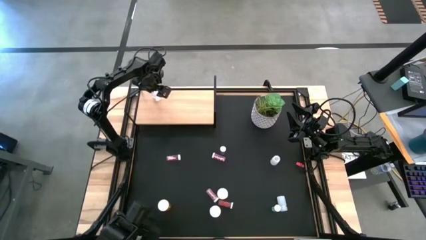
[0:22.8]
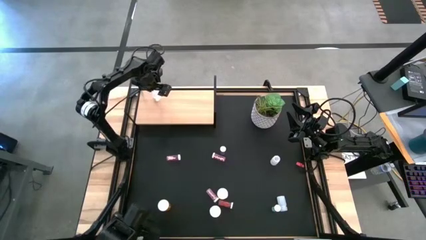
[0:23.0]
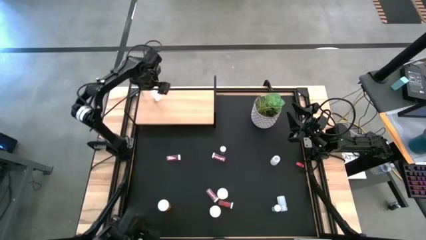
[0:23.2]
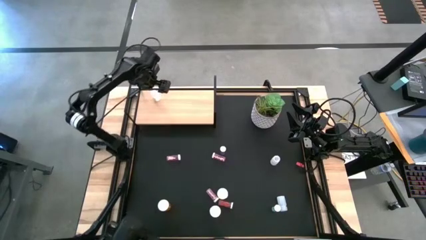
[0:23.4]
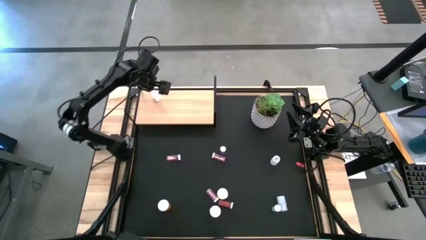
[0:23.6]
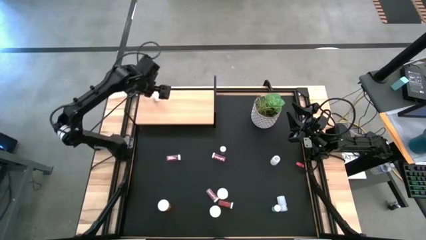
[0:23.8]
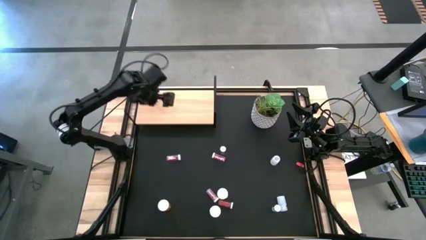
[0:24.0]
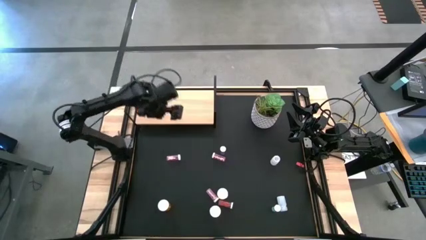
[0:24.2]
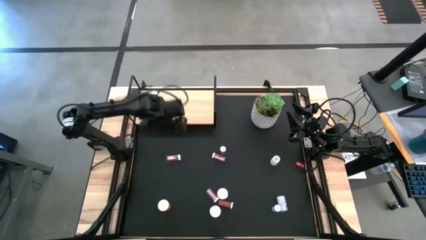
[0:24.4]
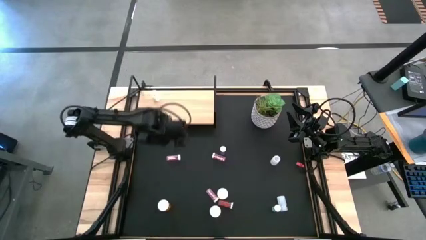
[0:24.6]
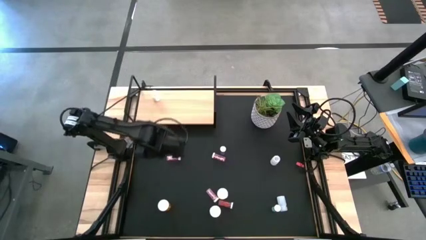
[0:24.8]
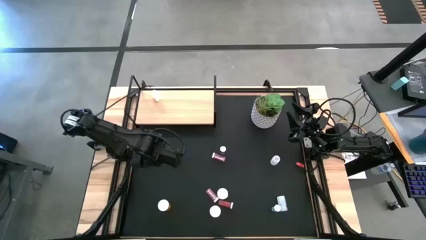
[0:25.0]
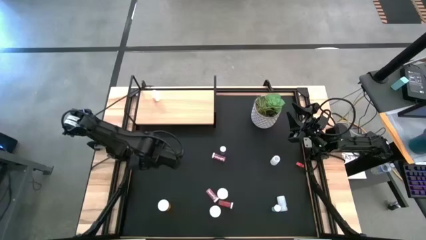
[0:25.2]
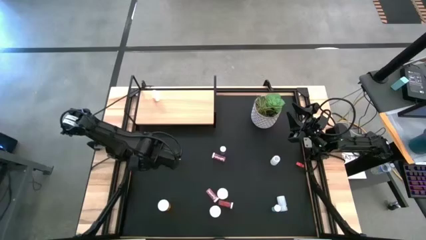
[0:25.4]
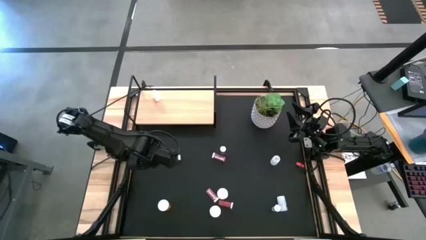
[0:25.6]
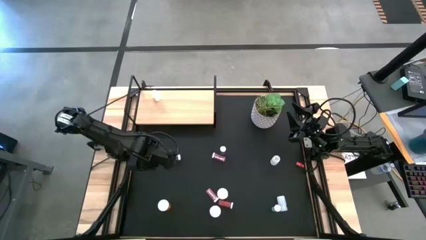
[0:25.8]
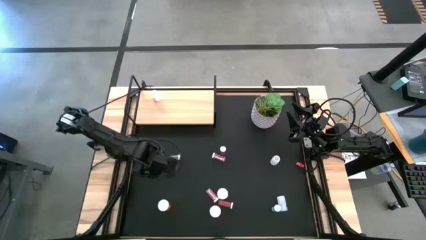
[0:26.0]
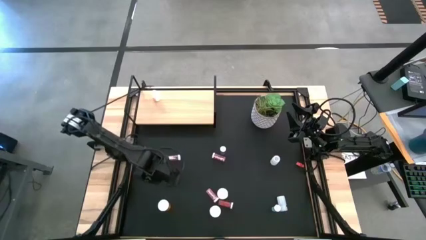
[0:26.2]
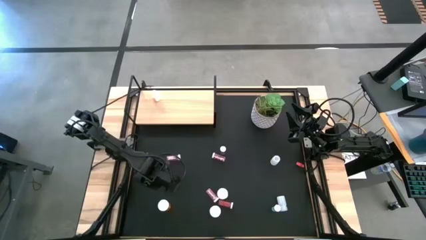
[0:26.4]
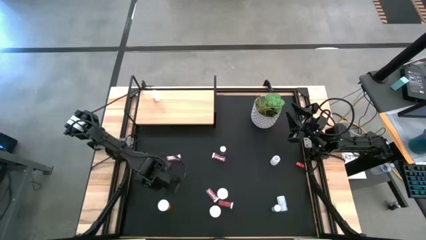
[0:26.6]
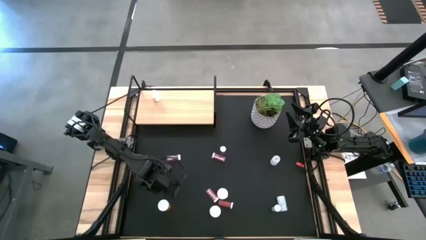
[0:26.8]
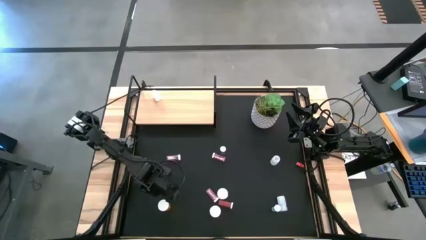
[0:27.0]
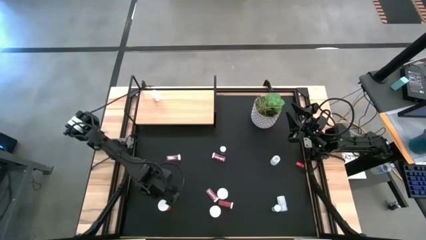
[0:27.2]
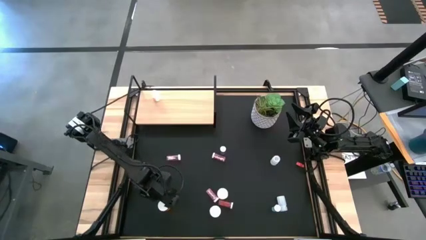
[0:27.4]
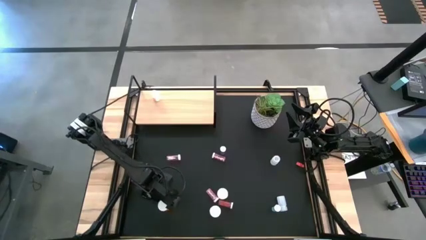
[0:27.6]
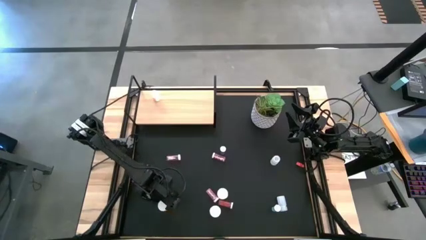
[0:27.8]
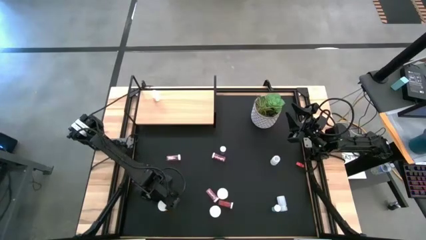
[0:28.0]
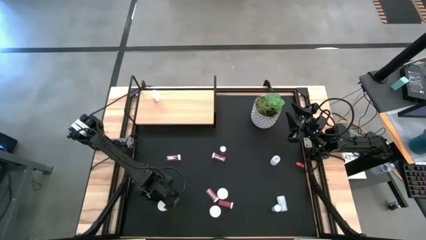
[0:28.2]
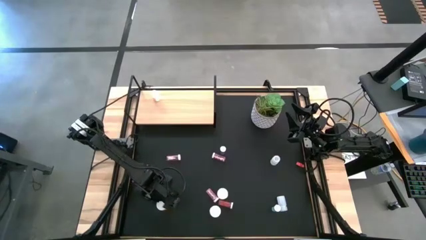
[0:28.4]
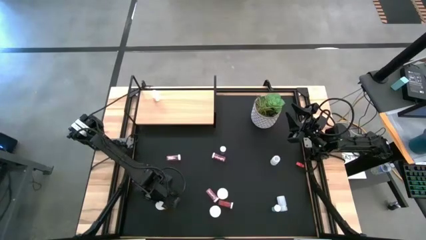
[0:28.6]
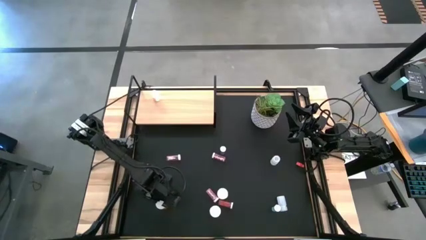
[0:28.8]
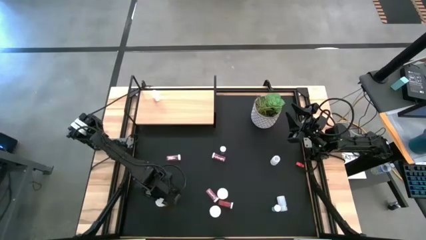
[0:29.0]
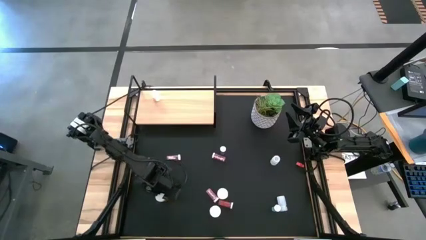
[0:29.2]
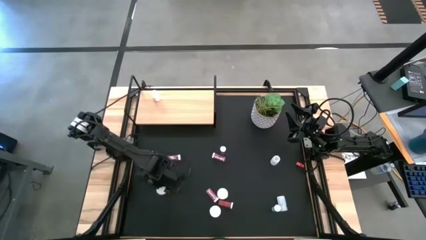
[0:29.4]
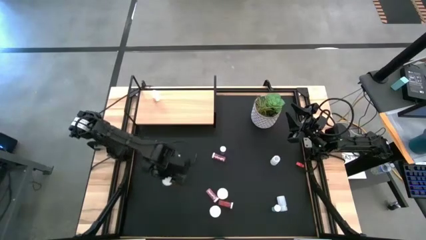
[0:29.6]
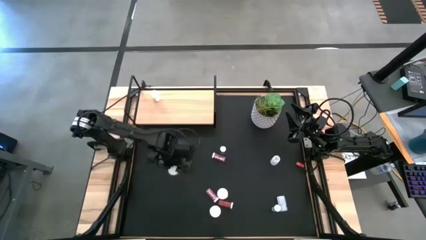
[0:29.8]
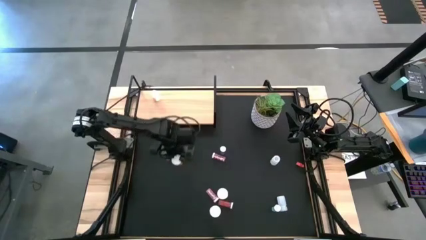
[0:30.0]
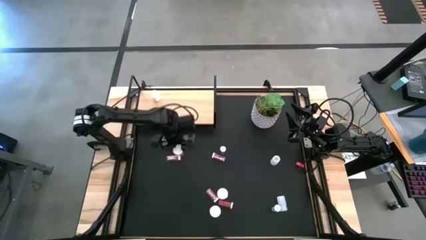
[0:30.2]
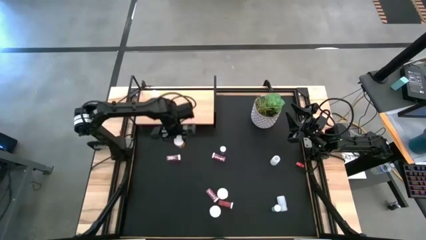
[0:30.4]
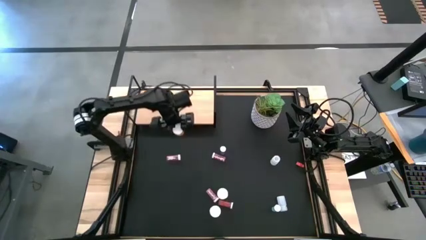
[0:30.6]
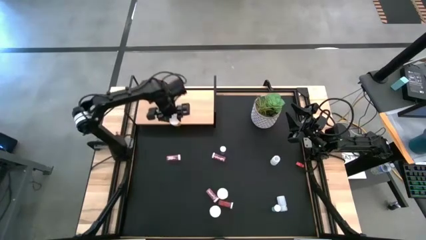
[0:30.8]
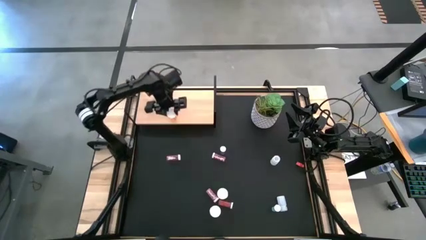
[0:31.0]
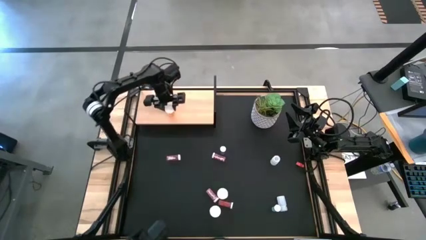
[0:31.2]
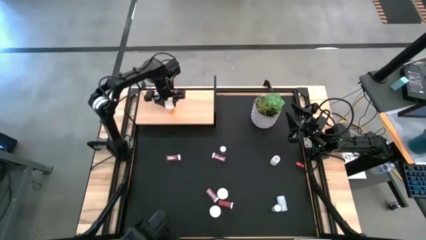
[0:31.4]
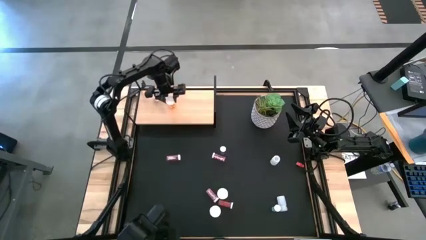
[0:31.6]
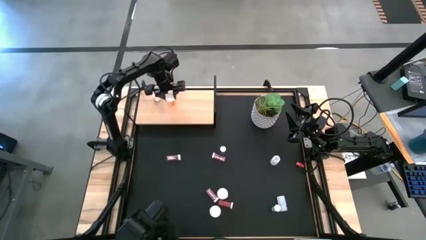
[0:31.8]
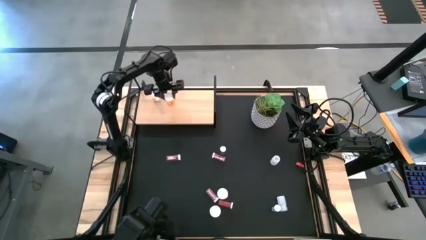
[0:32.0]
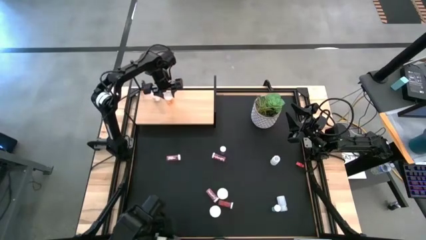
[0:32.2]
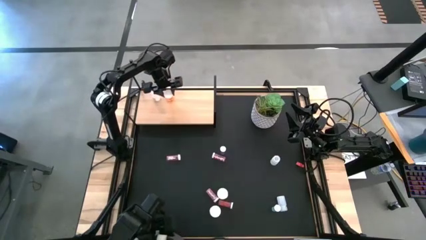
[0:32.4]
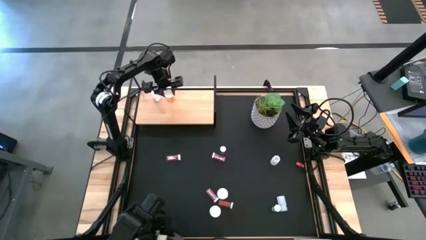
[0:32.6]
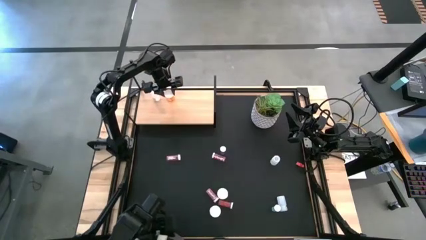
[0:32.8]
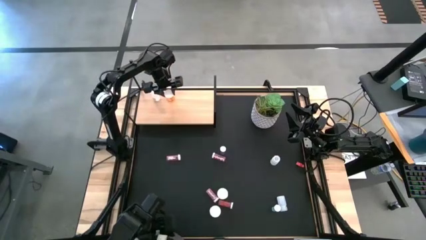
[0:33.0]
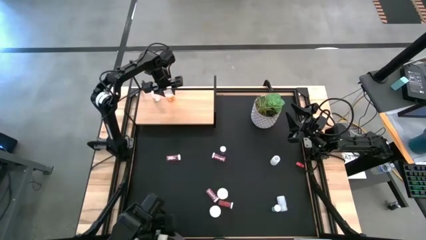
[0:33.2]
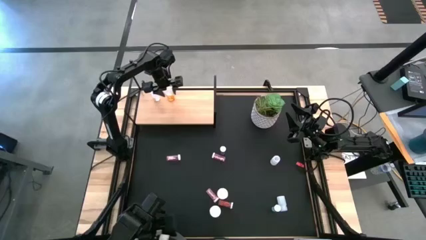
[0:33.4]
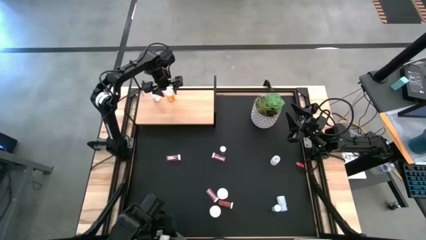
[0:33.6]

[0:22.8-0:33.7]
Task: Pick and place medicine bottles onto shelf by color
Put the bottom left orange pill bottle on the shelf

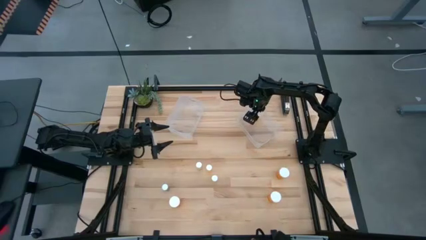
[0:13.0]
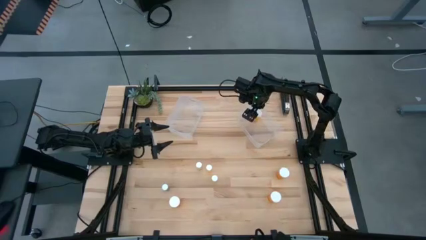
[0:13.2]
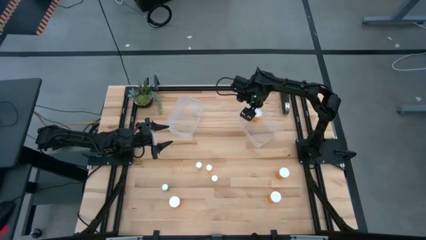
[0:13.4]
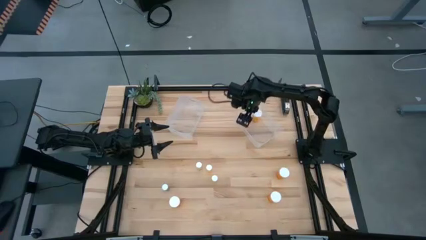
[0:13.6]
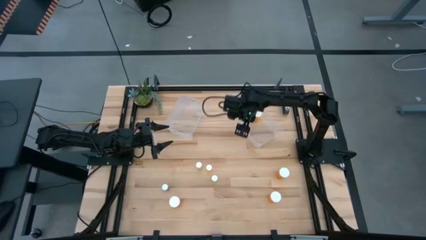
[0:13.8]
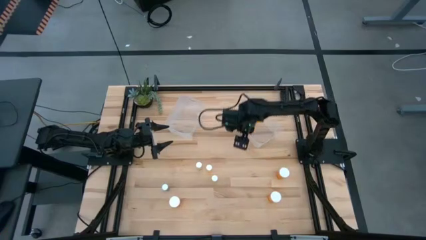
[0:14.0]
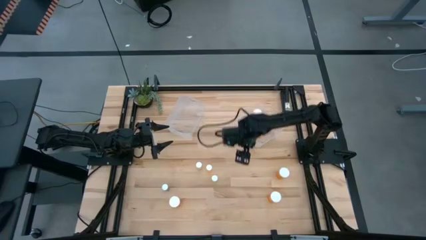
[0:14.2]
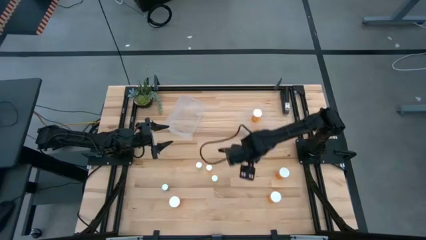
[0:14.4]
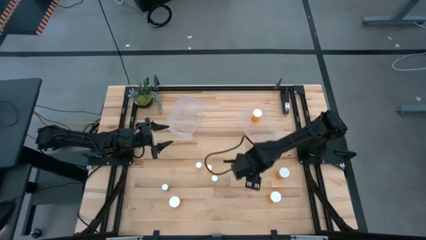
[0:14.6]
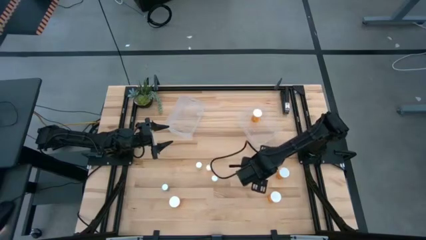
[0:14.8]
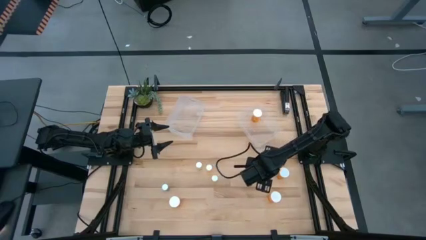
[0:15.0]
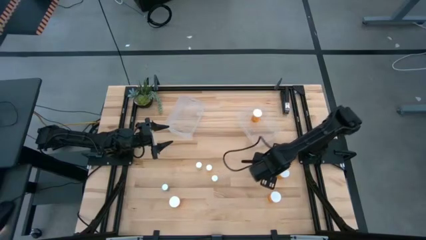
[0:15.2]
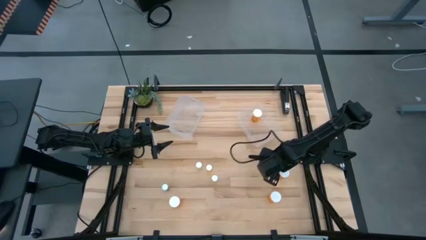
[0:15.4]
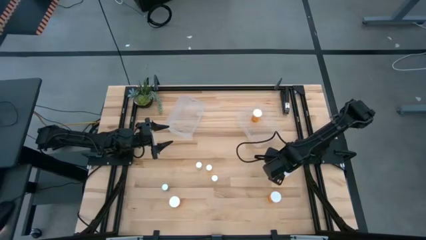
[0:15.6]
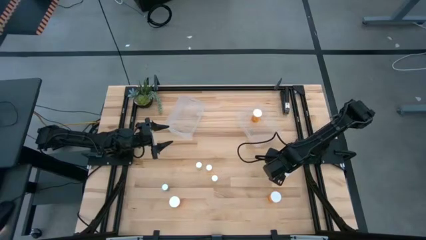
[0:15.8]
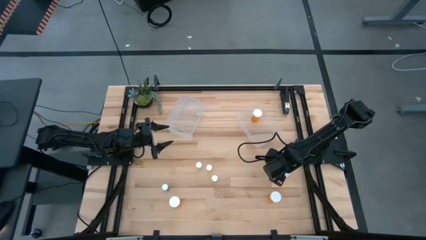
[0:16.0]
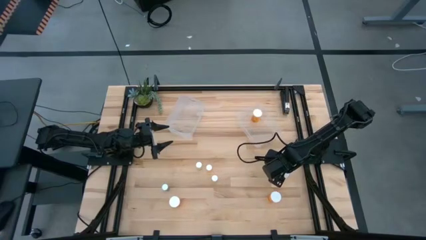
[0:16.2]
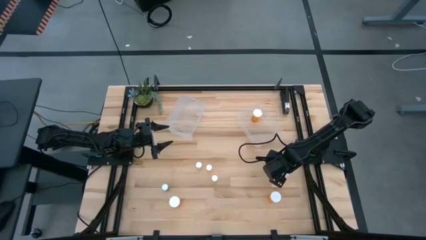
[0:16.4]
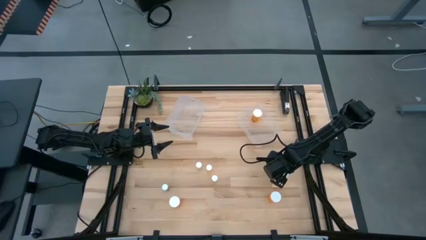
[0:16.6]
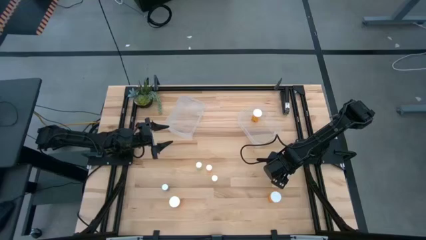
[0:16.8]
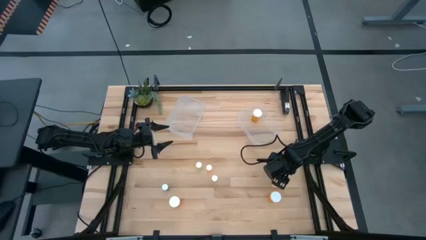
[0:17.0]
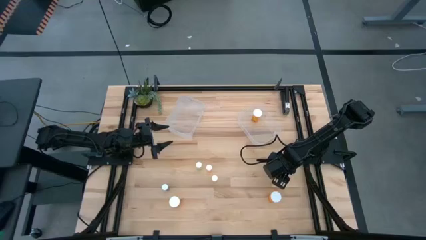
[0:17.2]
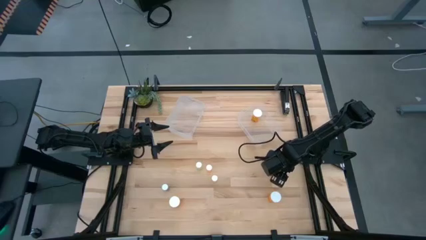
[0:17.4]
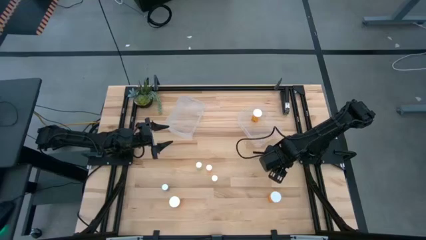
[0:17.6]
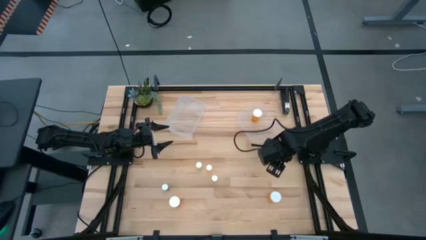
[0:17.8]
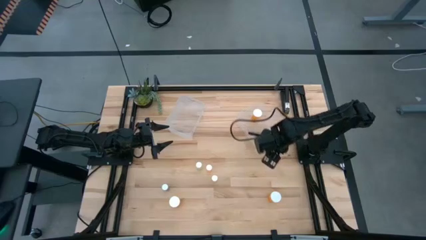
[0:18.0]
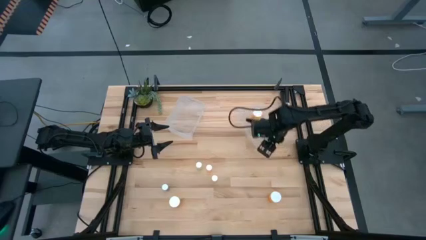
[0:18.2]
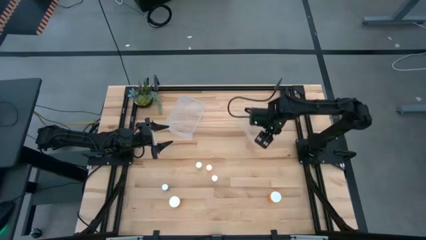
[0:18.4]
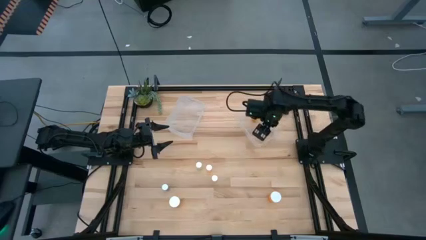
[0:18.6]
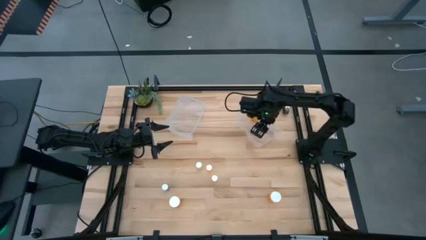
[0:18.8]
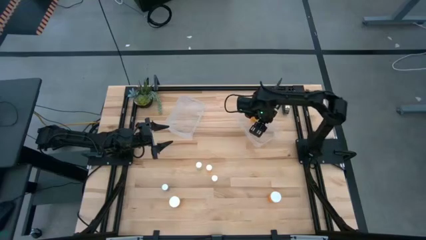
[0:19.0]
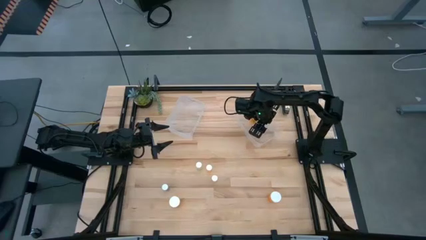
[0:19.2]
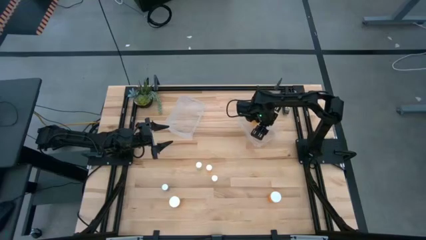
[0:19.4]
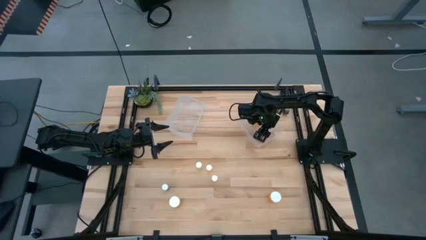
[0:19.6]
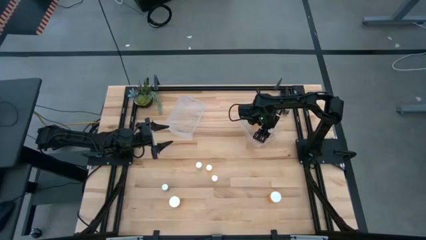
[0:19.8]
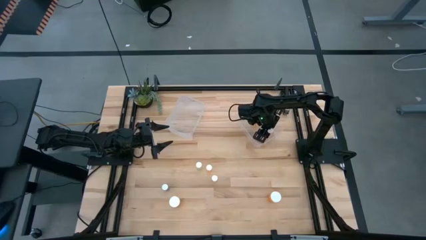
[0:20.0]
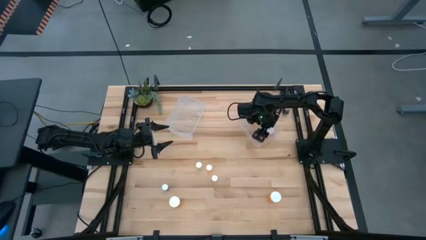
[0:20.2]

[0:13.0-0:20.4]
Task: Pick and place medicine bottles into bin by pill shape (circle, oval)
Put the big orange pill bottle into the right transparent bin
